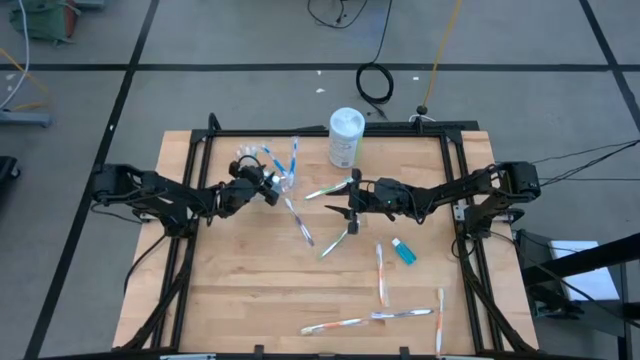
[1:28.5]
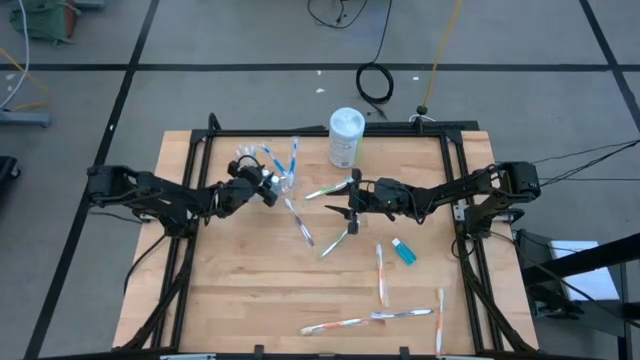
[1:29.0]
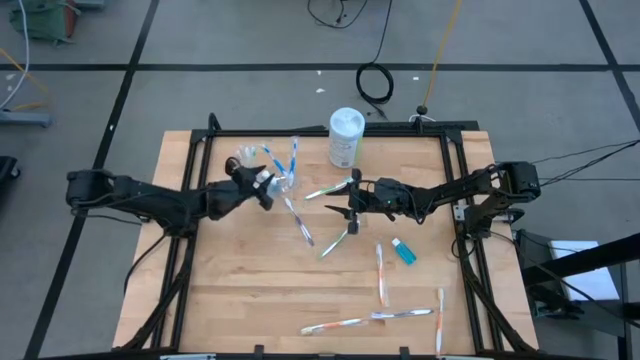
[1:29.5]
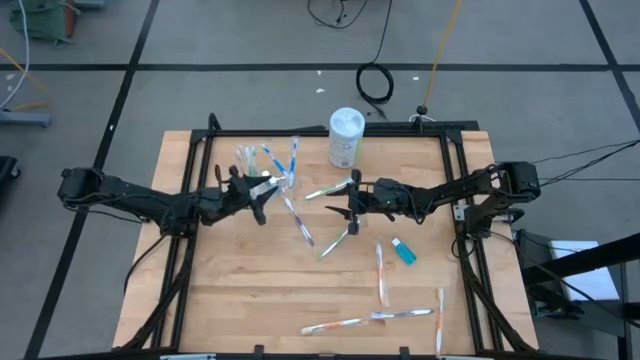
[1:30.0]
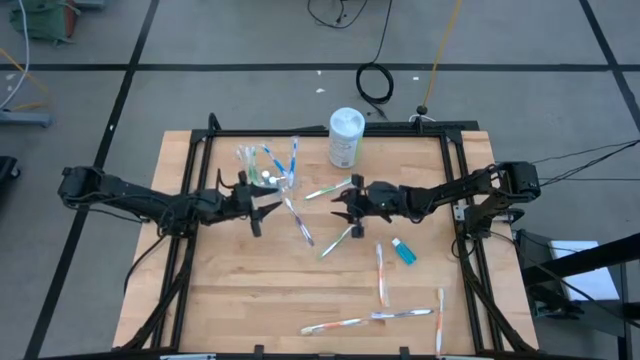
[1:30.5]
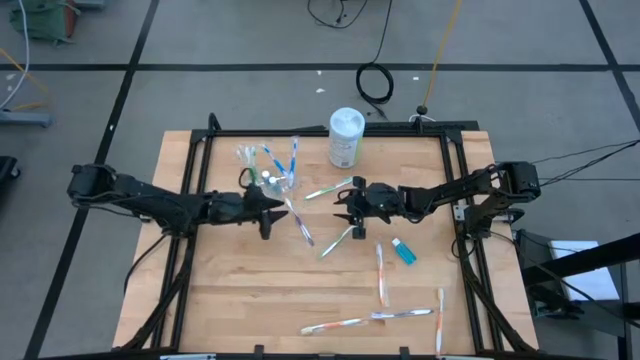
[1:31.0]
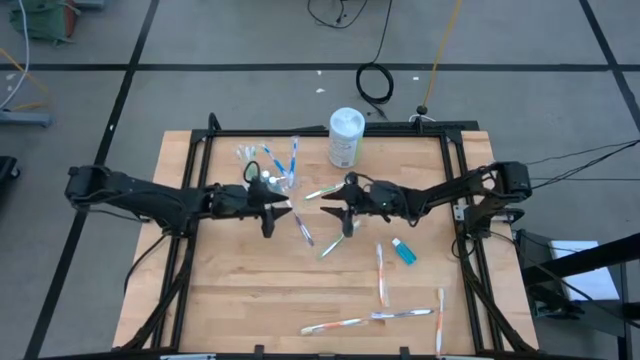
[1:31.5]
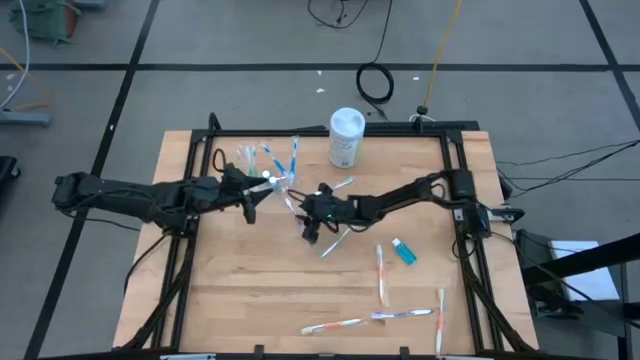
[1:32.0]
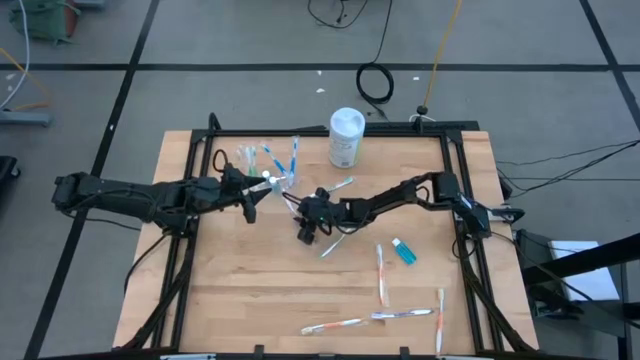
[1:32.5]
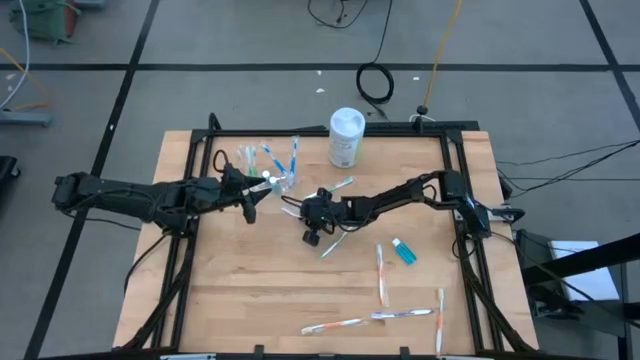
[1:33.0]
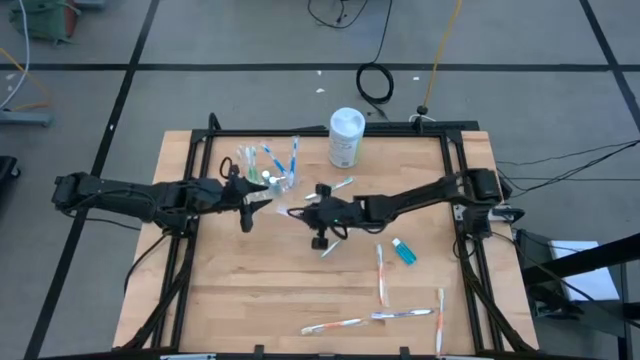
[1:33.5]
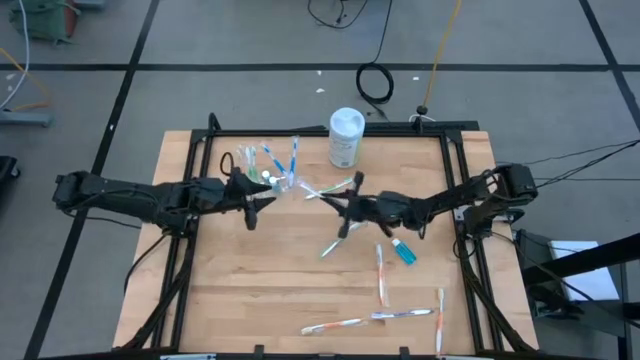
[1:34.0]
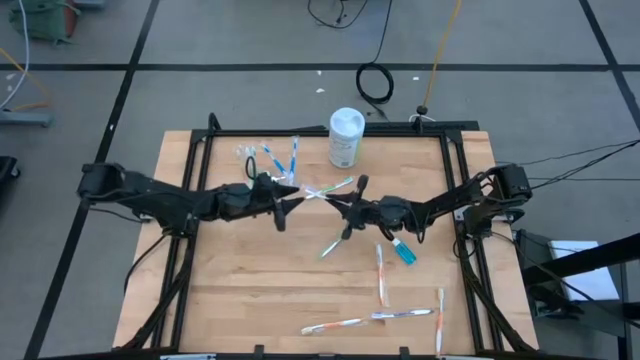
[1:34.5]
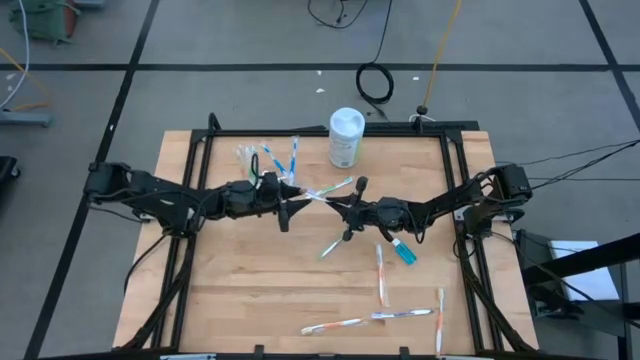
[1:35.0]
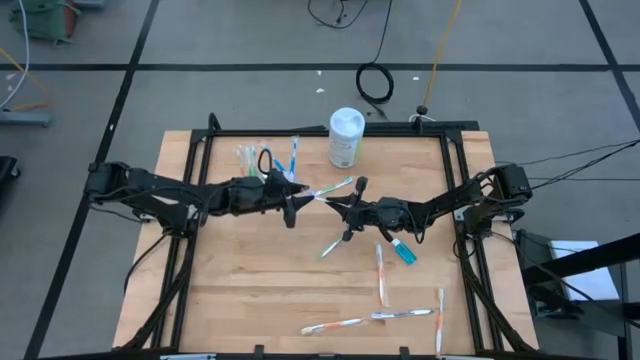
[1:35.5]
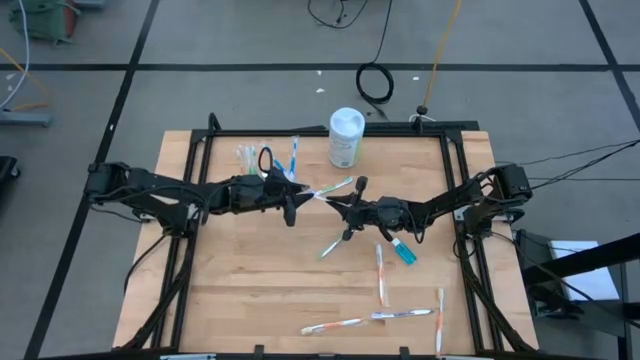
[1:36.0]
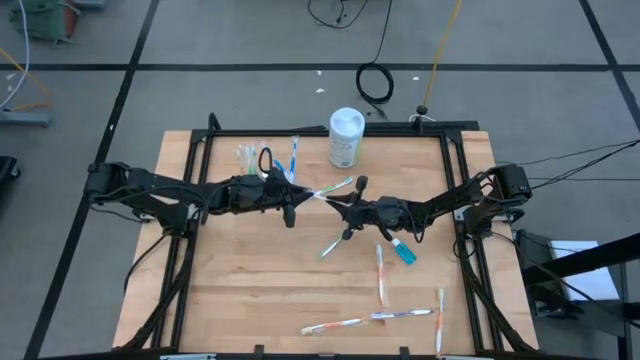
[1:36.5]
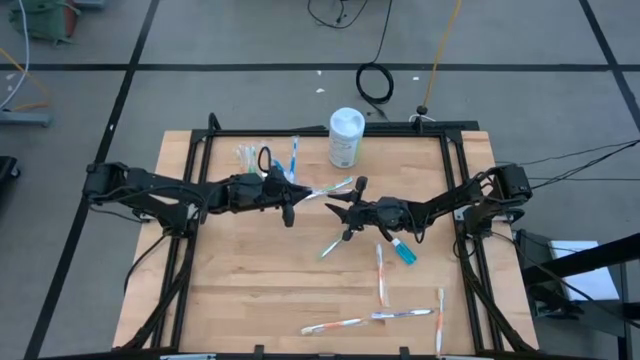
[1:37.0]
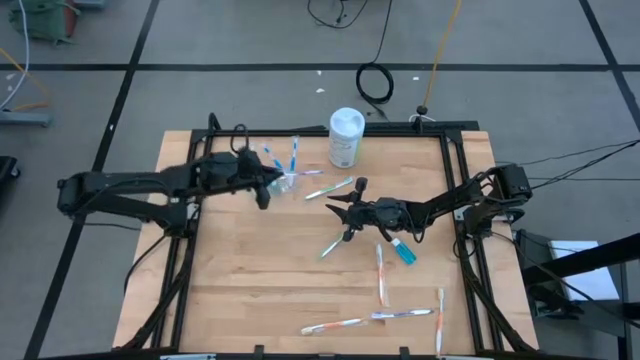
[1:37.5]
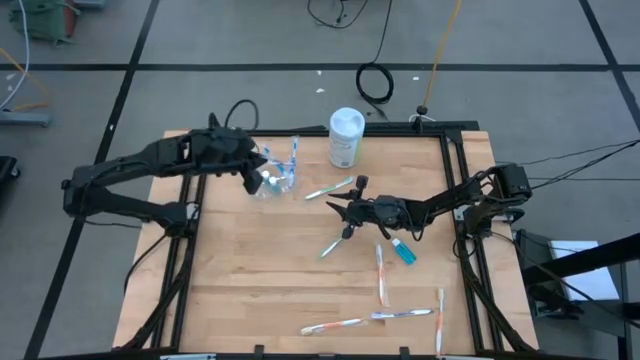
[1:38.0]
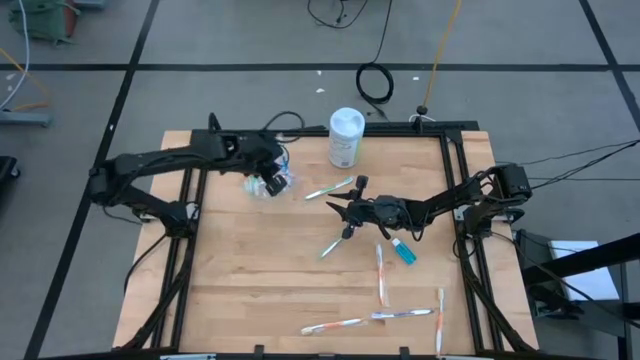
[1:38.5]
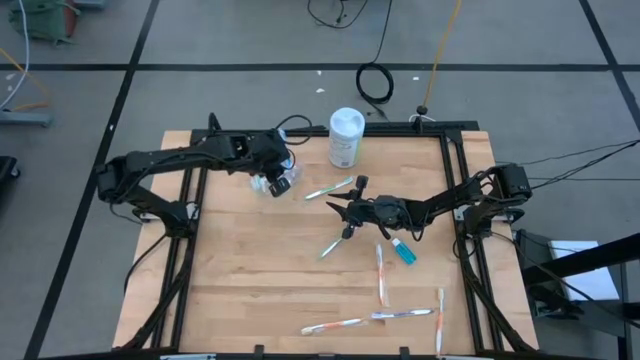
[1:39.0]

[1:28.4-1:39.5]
Task: Pick & Place toothbrushing station
Put the violet toothbrush into the right of the transparent organizer

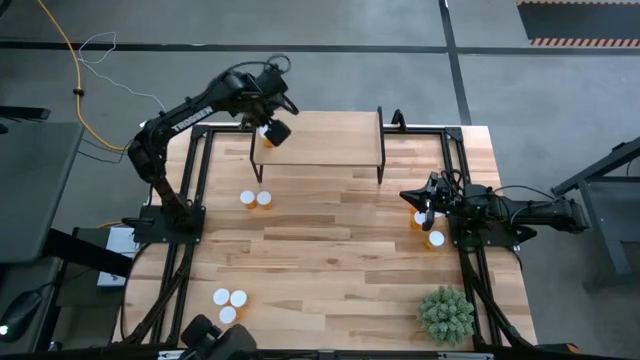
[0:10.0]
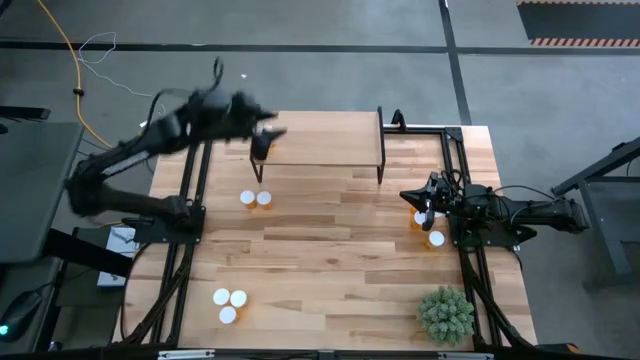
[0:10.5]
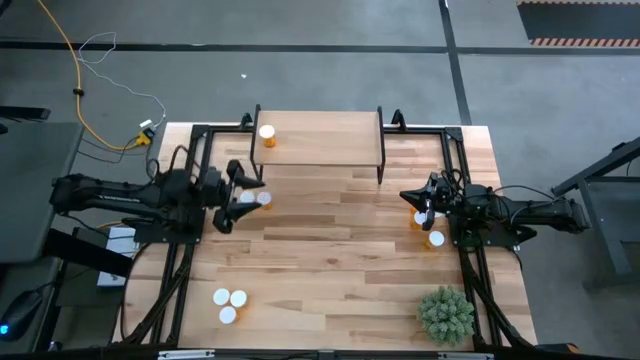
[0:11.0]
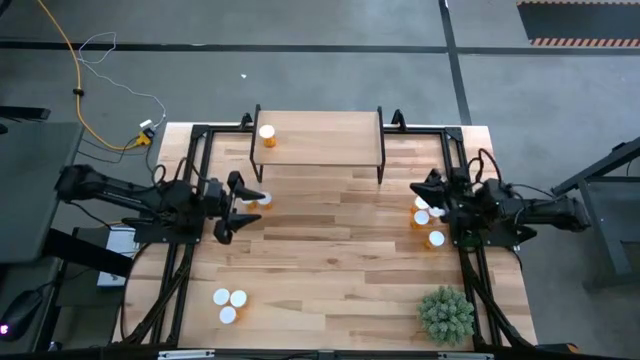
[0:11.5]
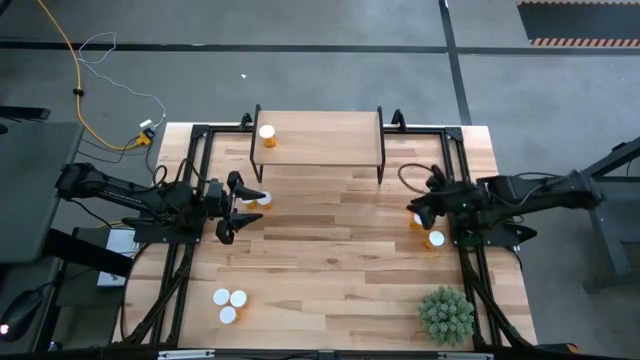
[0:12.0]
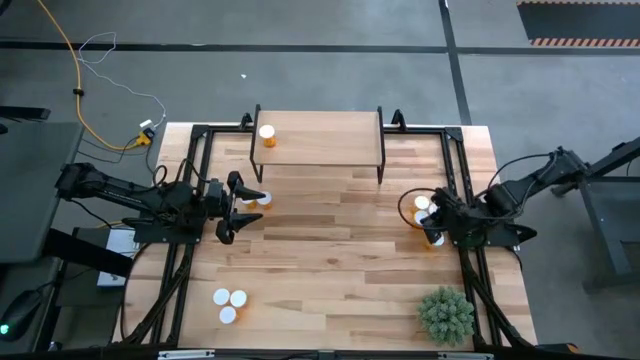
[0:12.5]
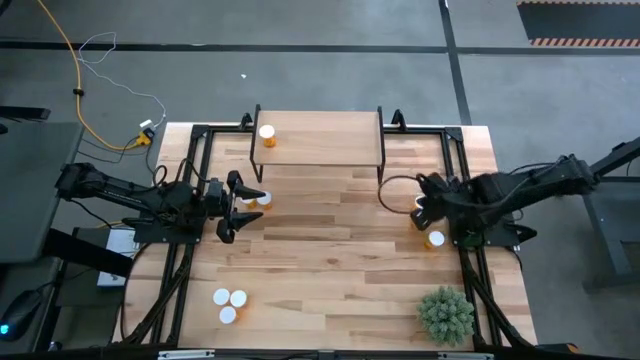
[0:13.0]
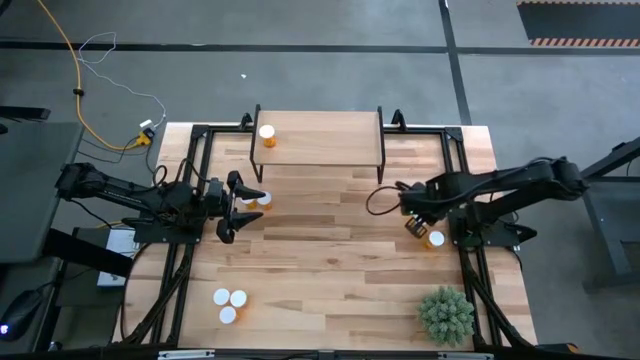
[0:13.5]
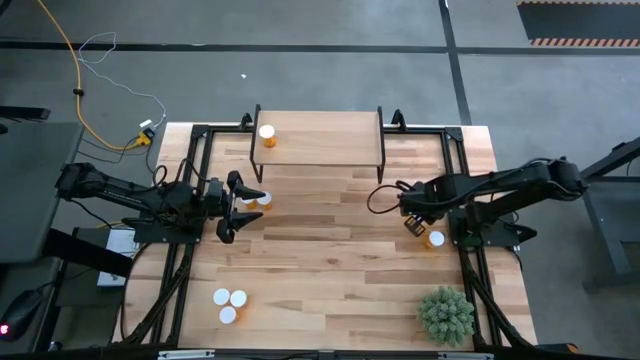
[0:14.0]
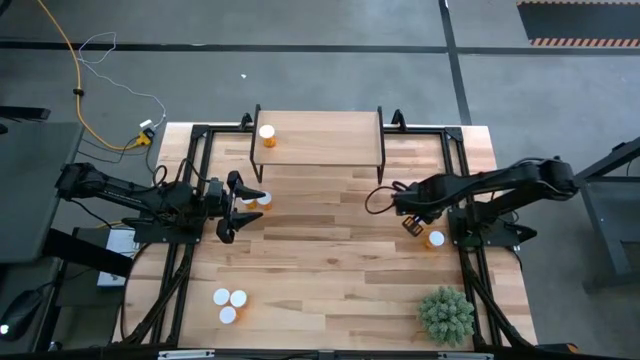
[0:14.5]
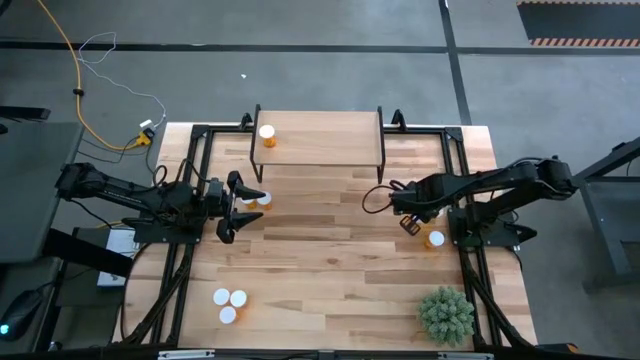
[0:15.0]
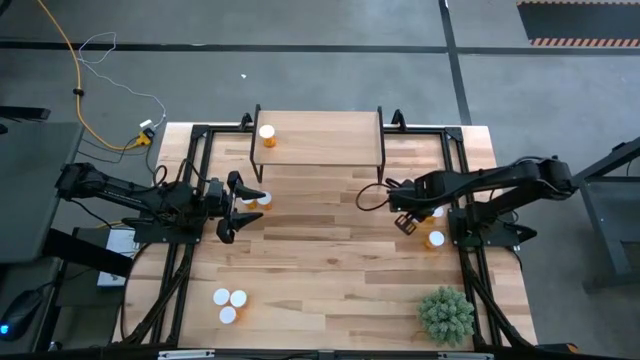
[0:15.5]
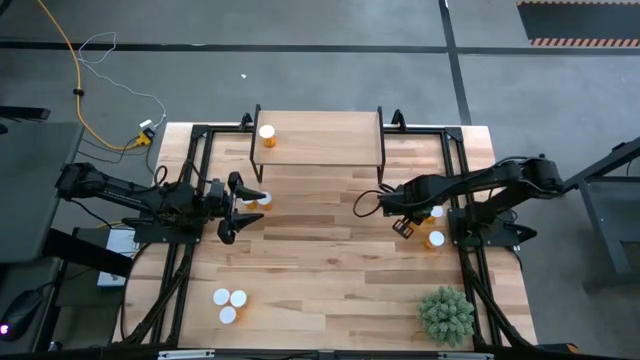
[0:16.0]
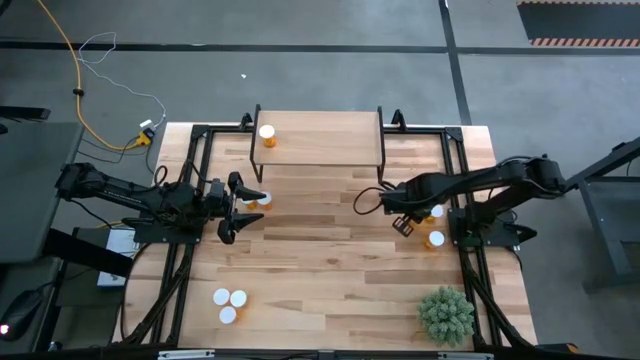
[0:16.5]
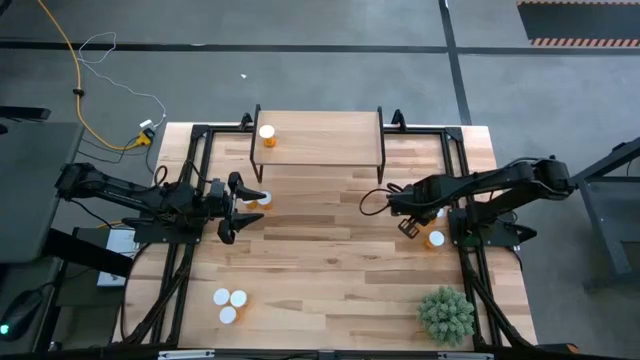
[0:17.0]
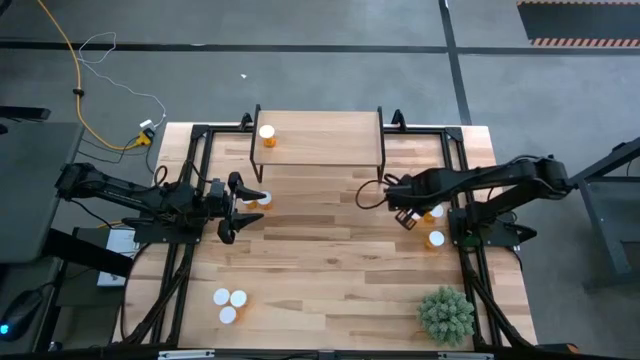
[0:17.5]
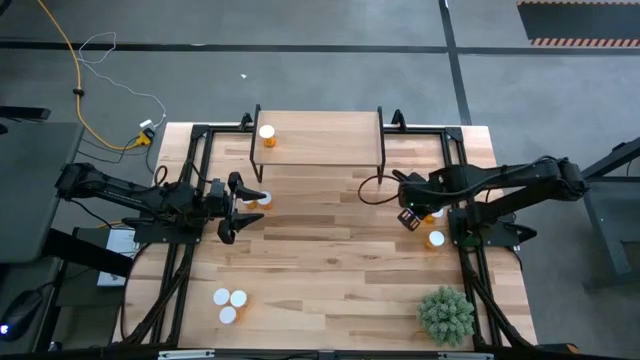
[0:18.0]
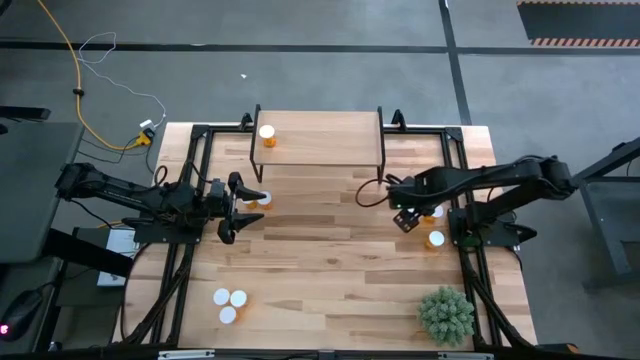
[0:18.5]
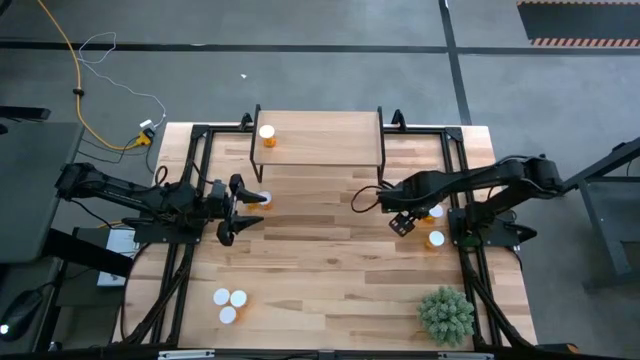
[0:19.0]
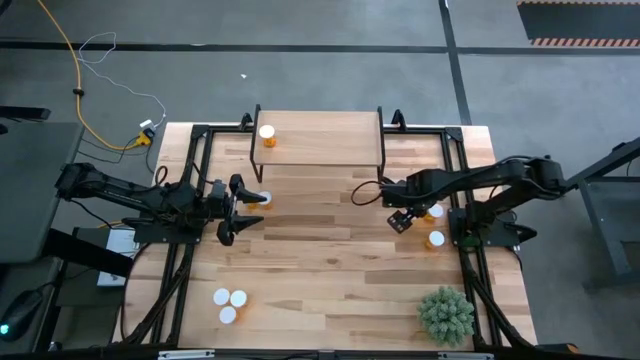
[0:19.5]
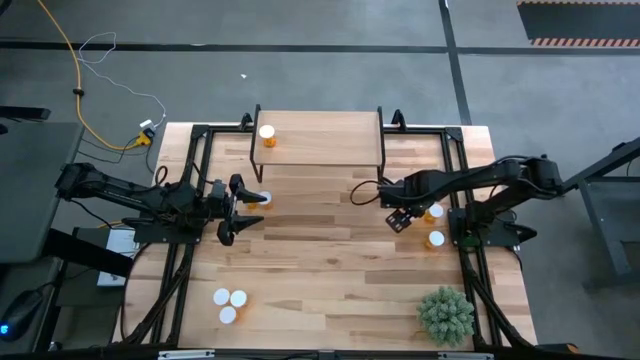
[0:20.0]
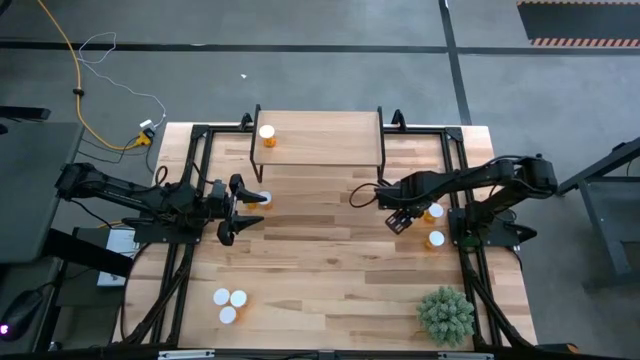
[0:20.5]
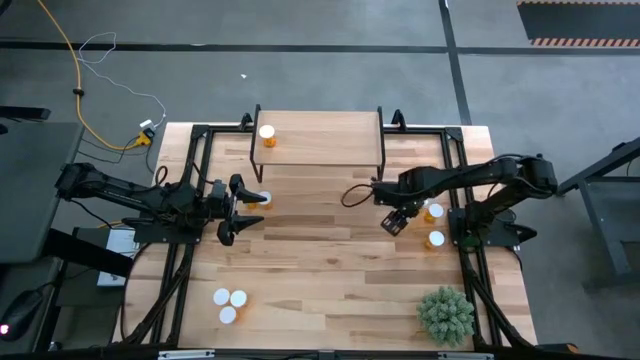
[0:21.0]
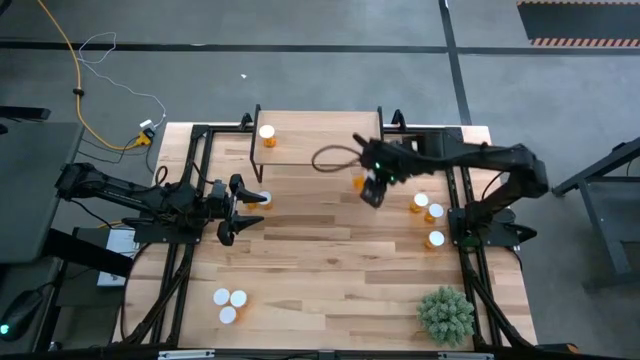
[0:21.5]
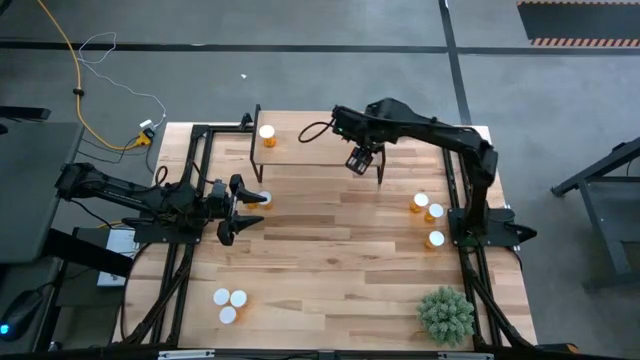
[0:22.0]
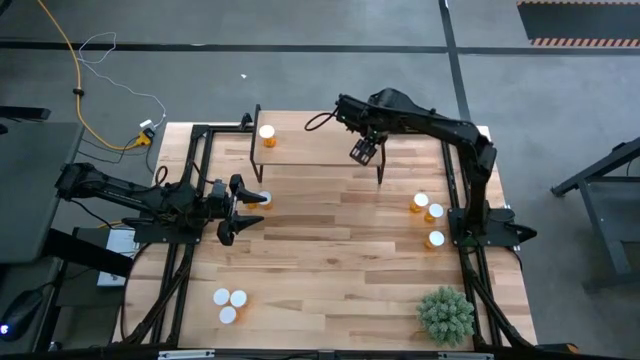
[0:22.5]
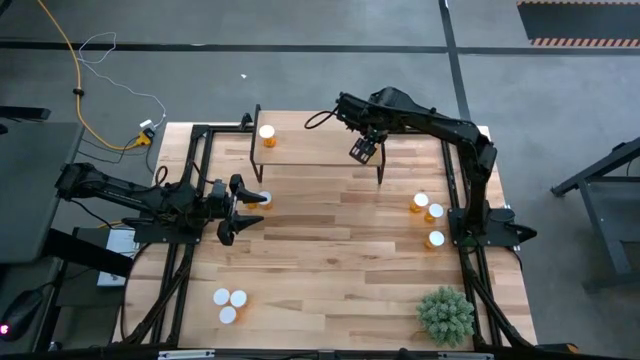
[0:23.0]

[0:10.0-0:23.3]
Task: Pick and place medicine bottles onto shelf by color
Put the orange pill bottle on the shelf
